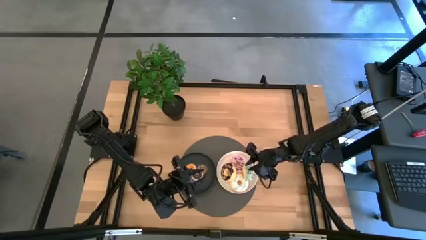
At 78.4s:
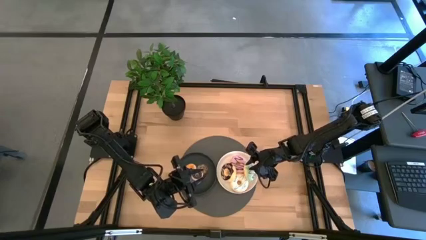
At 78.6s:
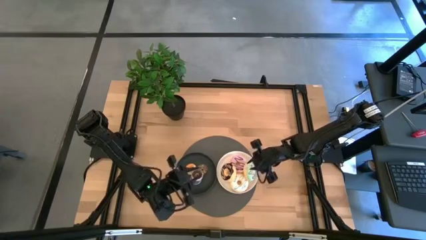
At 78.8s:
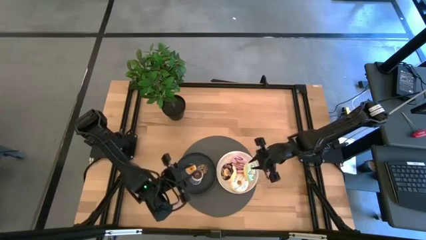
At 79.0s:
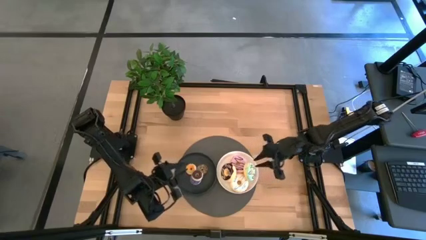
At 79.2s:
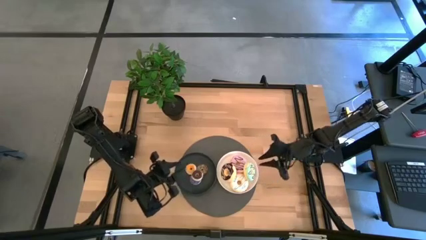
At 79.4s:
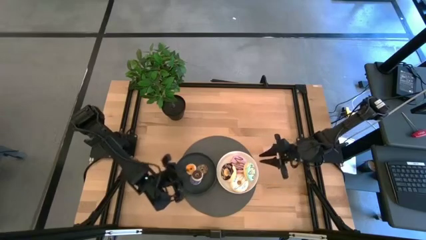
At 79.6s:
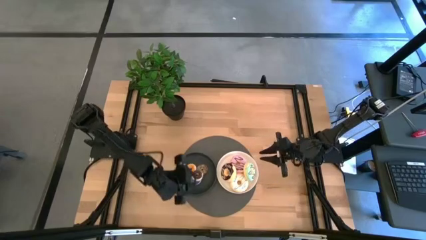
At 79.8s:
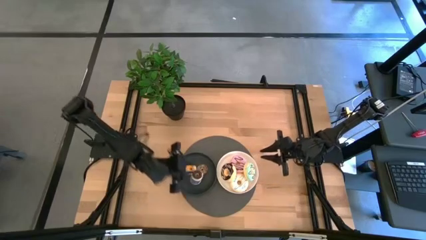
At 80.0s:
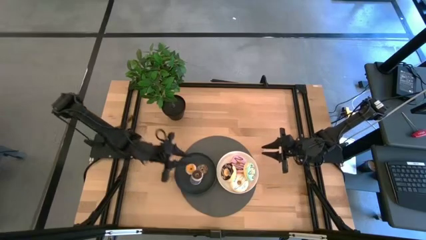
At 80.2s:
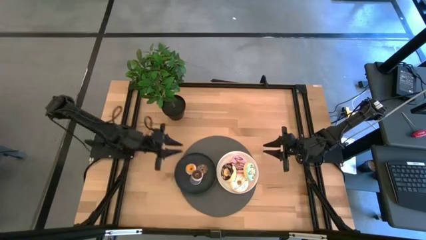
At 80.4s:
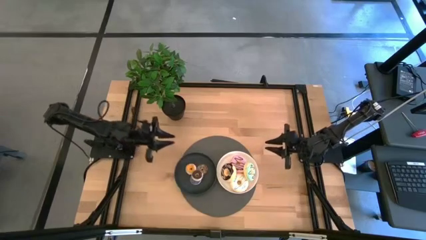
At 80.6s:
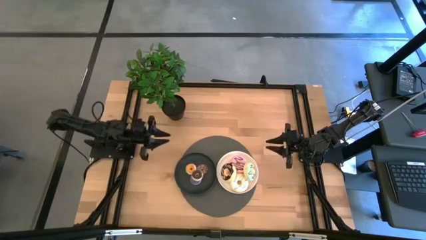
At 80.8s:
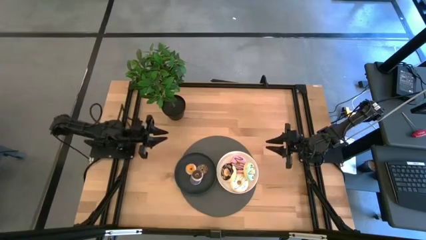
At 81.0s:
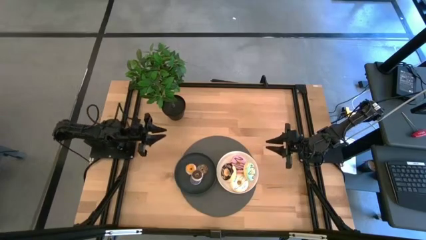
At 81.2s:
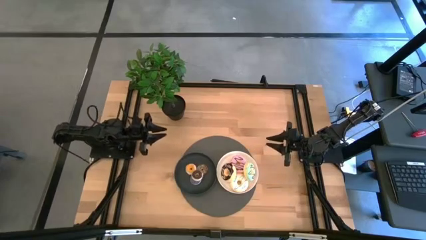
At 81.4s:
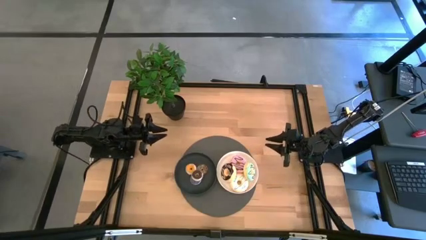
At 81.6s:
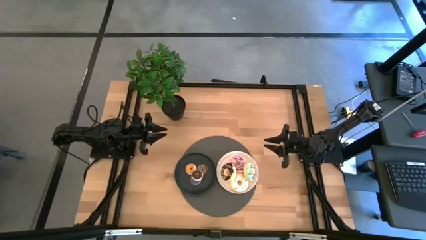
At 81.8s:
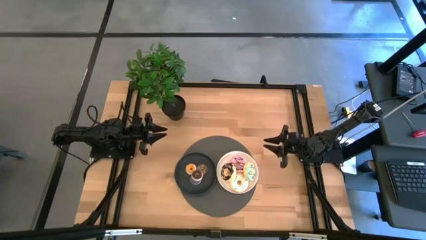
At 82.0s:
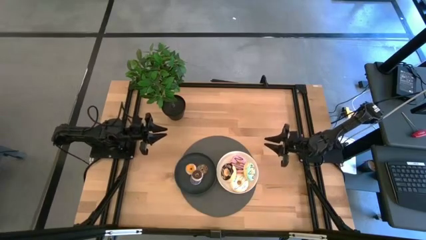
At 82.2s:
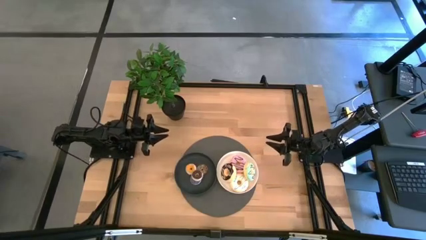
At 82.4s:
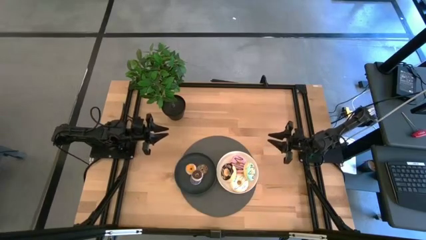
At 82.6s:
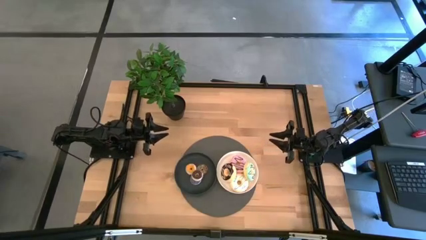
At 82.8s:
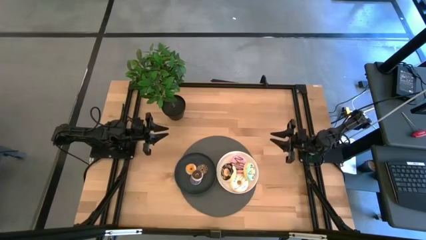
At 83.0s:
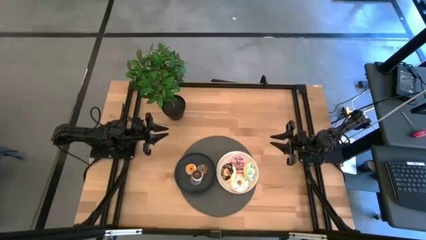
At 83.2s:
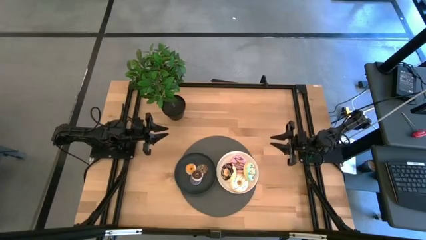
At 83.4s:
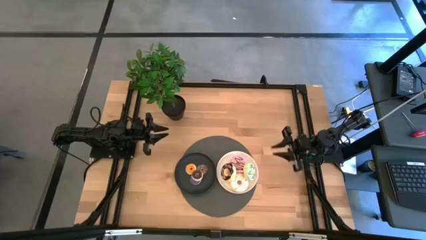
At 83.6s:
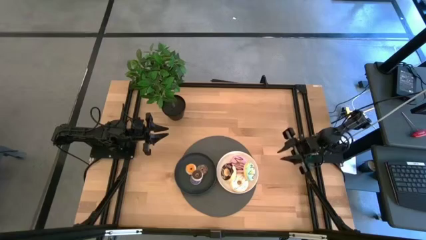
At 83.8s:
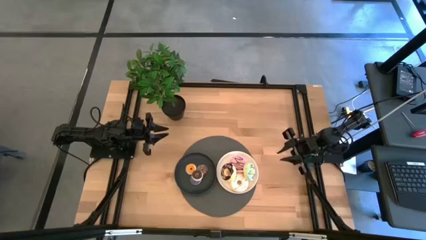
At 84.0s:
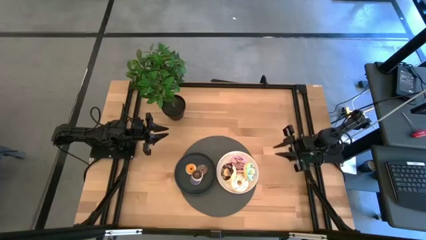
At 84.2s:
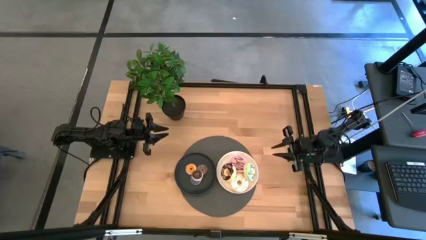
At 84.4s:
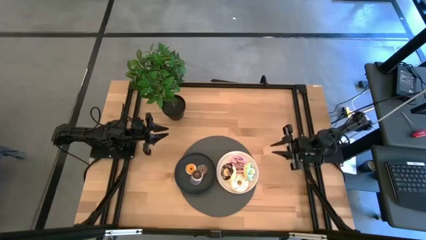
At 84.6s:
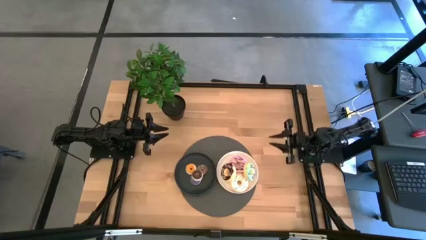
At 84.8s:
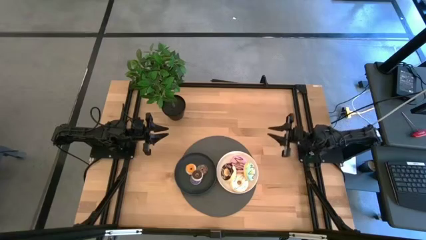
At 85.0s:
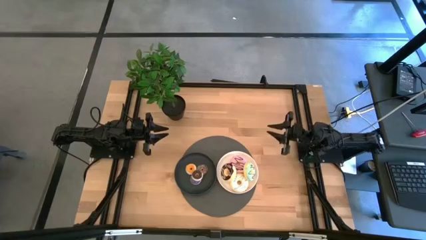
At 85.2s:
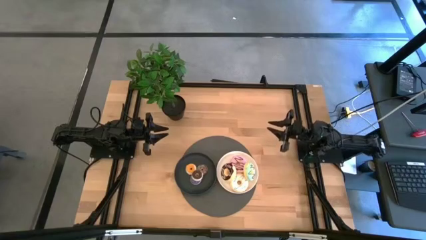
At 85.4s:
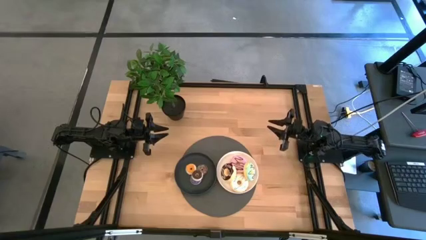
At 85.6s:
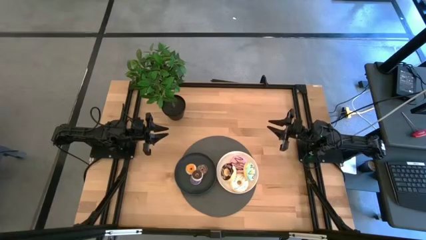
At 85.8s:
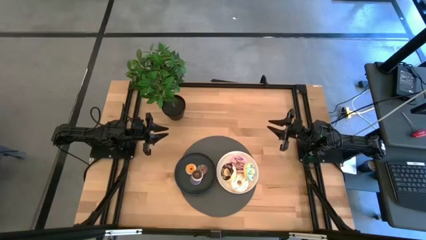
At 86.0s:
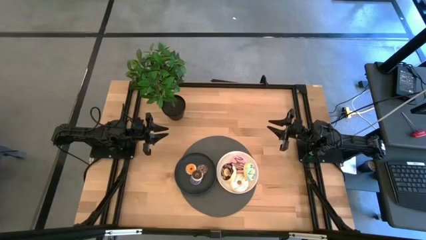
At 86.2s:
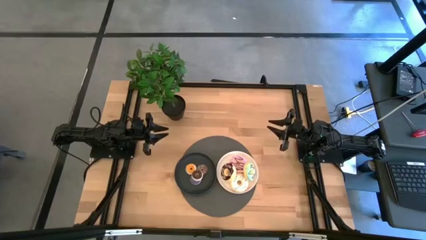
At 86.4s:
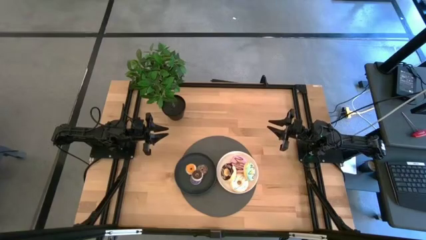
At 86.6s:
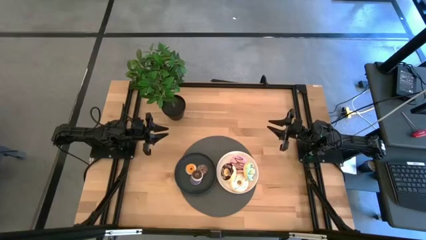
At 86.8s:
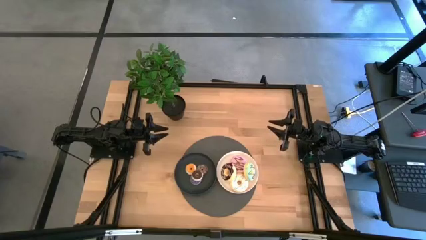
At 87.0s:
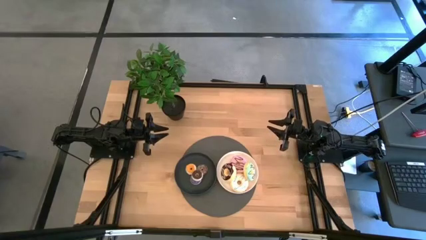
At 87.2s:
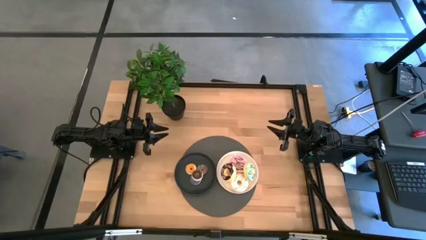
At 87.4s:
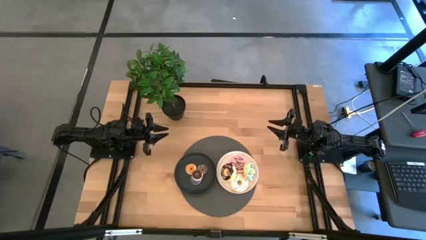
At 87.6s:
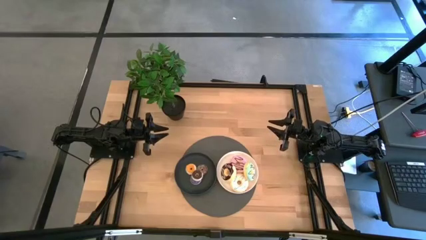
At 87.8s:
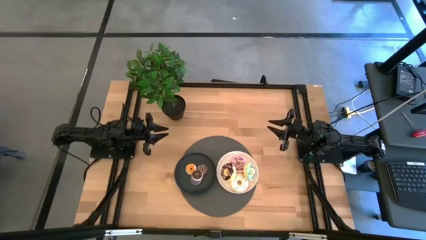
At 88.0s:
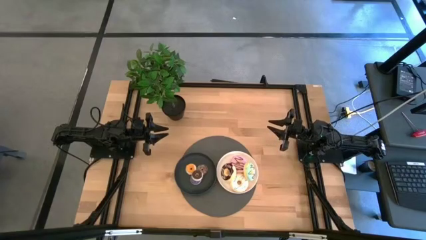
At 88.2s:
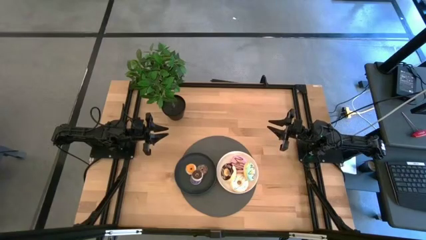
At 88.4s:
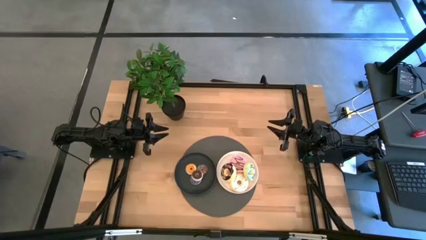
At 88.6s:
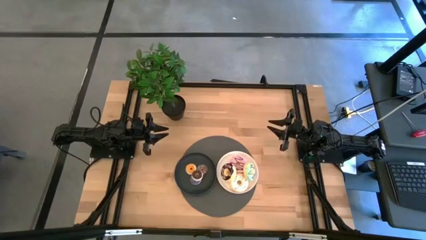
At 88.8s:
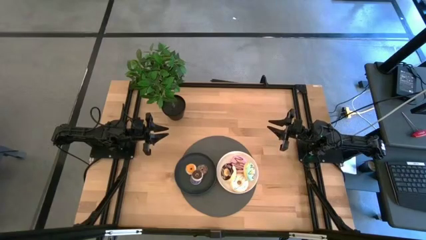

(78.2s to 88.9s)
Task: Pick & Place donuts
Return to Home Position

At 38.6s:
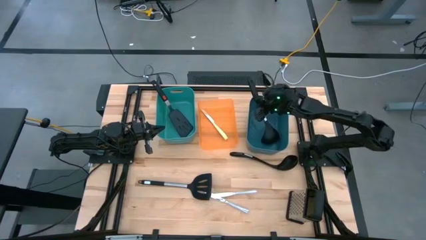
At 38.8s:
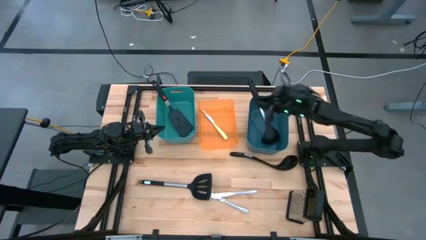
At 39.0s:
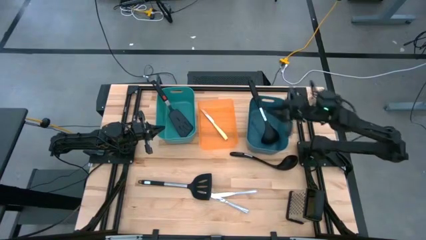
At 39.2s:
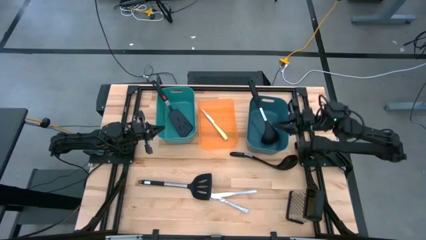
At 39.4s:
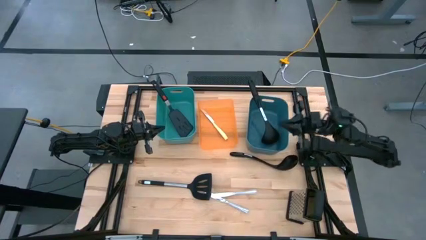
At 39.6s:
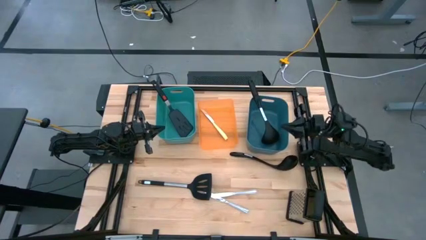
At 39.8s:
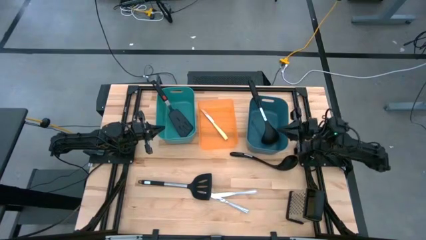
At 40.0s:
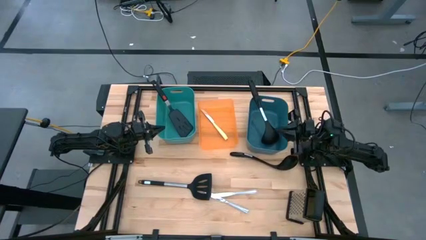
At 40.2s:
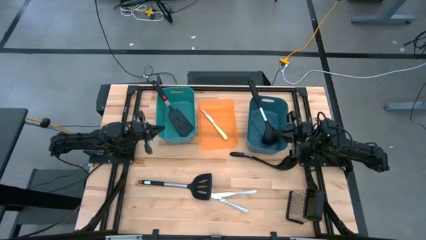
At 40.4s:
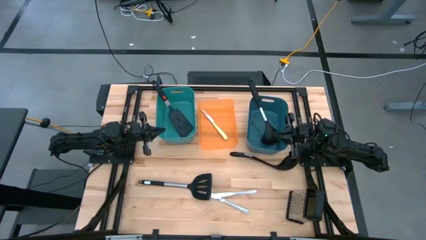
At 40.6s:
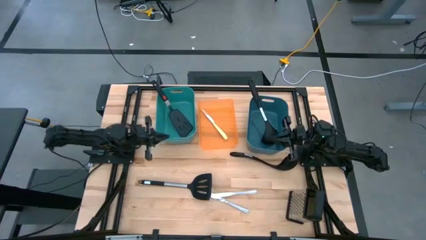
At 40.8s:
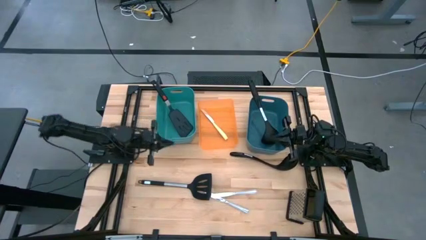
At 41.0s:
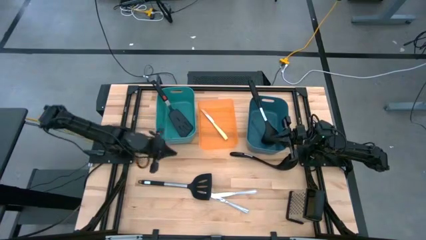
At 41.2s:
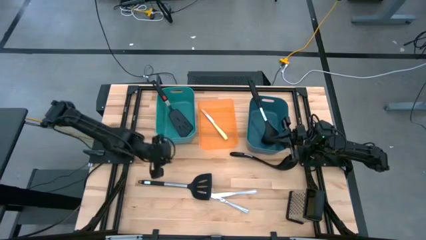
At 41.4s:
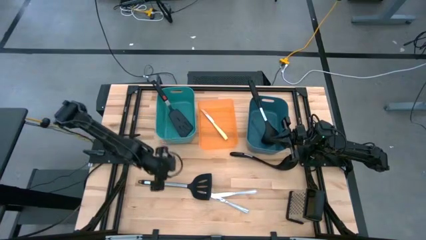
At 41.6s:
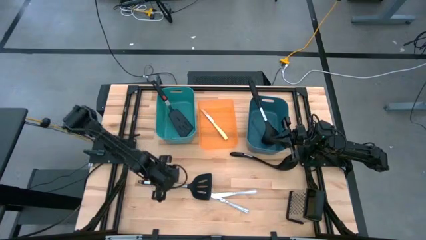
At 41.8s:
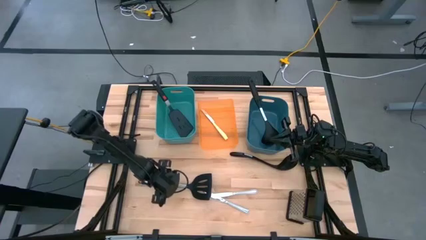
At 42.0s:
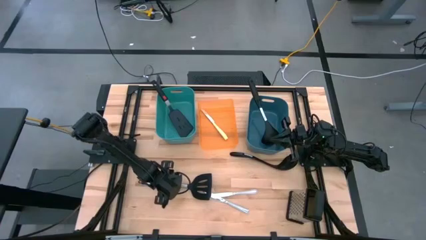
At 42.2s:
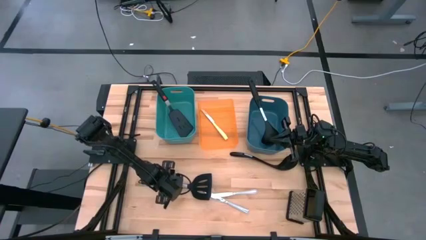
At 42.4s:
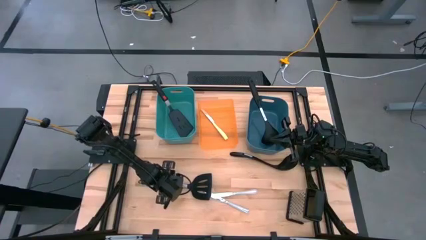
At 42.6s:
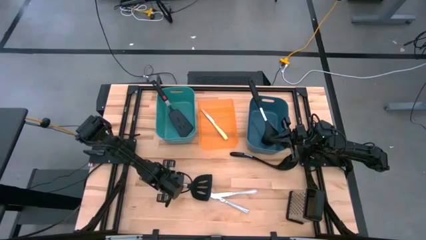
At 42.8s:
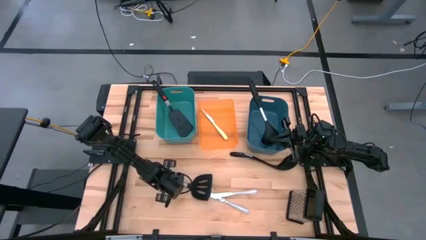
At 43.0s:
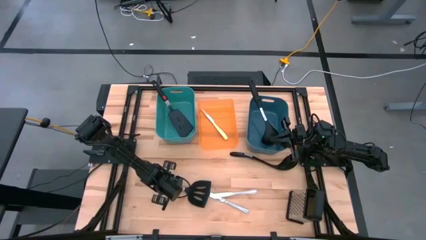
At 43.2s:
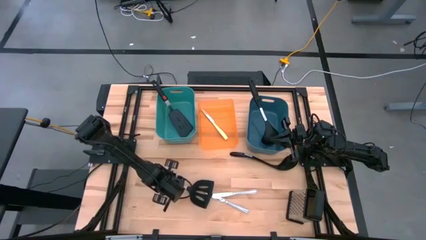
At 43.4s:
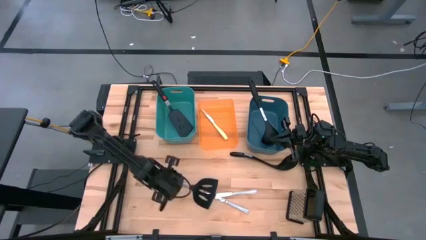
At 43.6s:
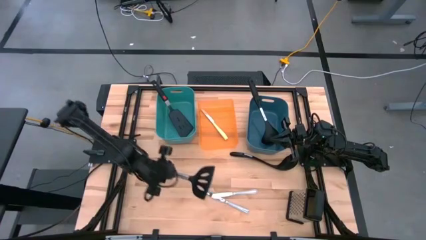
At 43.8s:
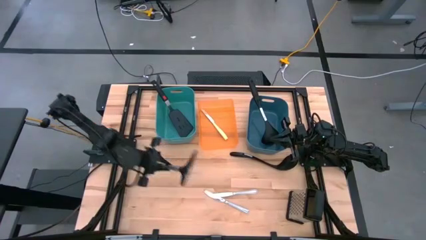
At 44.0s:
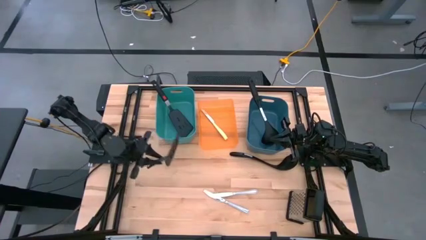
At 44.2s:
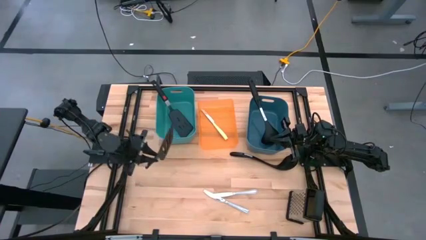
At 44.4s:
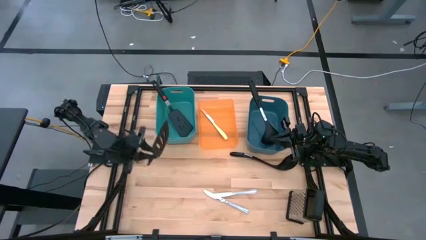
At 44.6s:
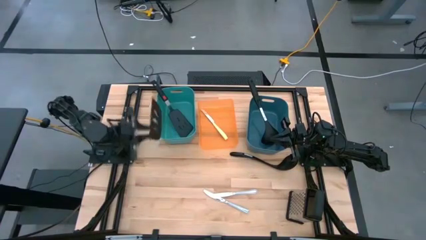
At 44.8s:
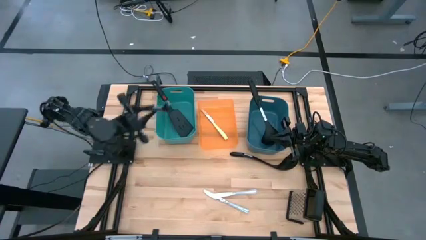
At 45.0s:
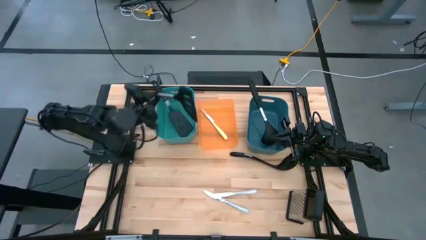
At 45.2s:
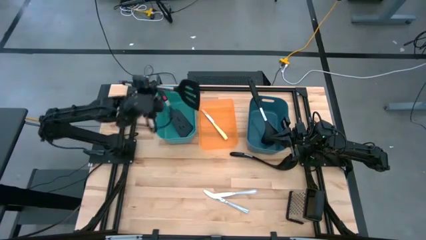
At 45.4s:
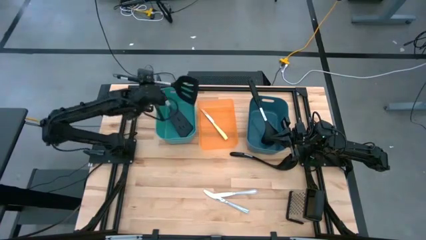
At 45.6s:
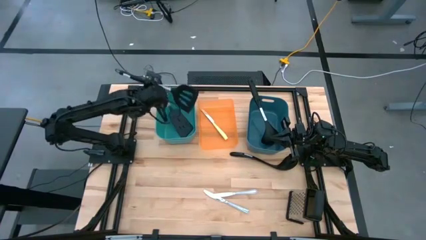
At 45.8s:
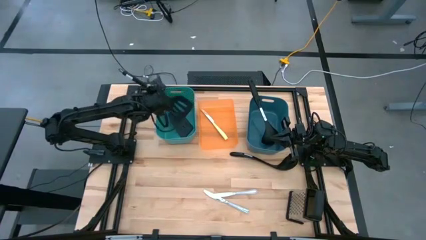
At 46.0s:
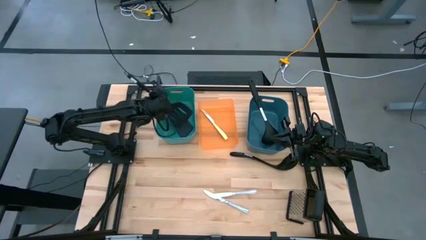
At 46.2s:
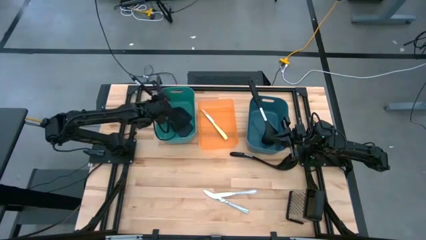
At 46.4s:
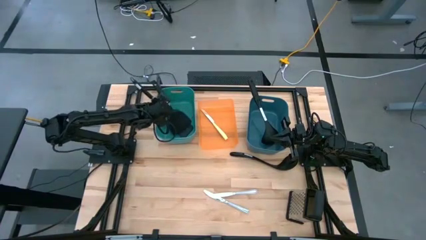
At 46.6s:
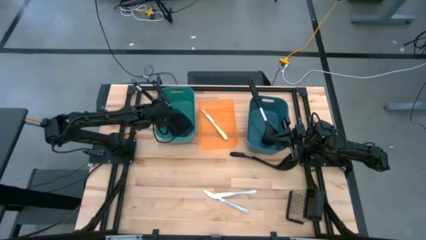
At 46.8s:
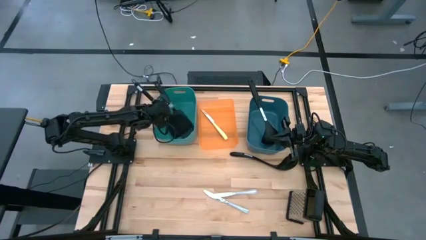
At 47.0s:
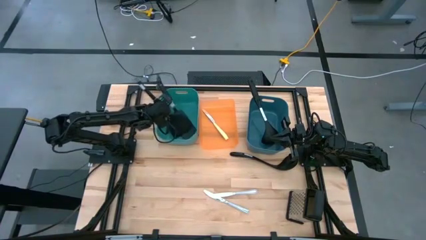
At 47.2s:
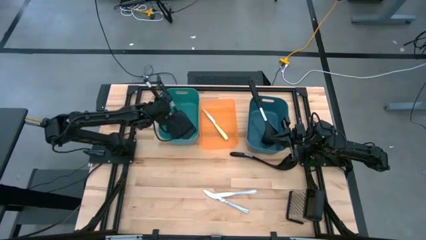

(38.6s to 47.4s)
Task: Pick & Place Kitchen Items
Put the black spatula into the light green bin
